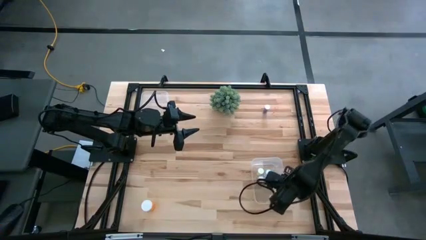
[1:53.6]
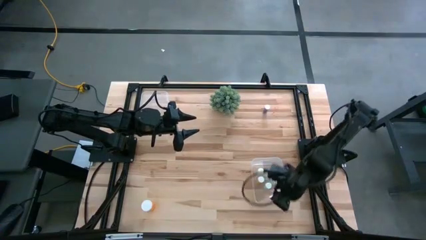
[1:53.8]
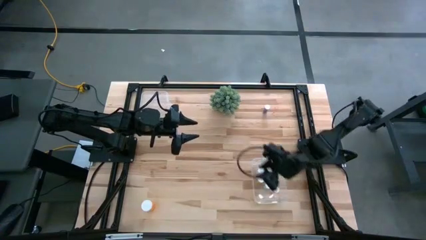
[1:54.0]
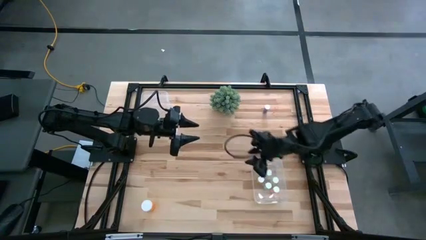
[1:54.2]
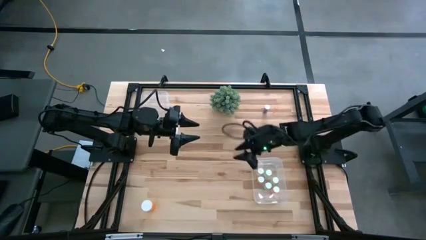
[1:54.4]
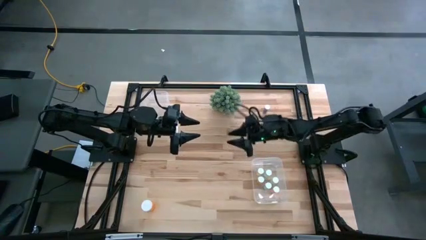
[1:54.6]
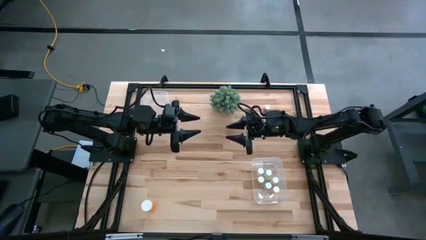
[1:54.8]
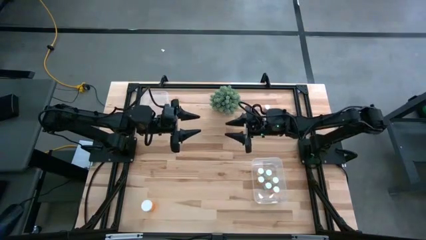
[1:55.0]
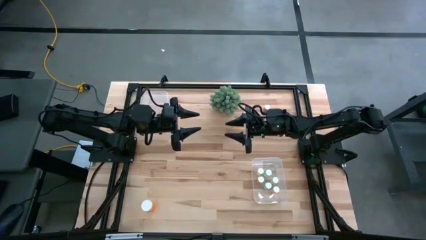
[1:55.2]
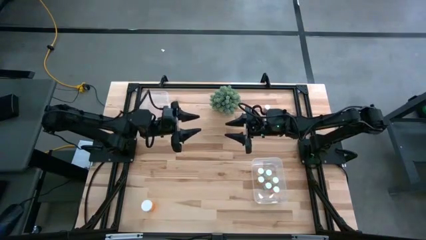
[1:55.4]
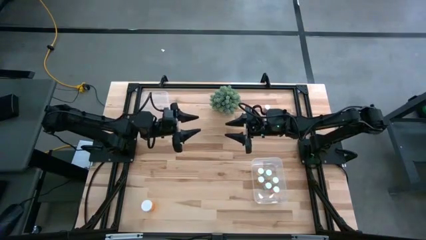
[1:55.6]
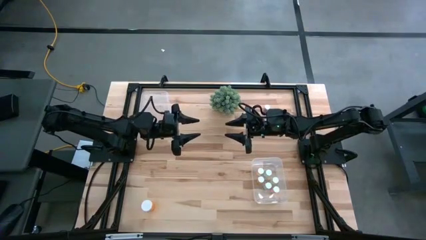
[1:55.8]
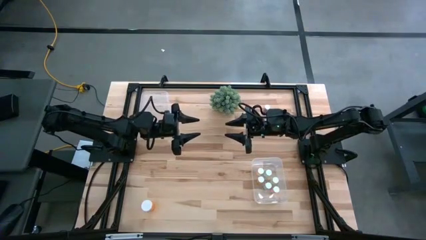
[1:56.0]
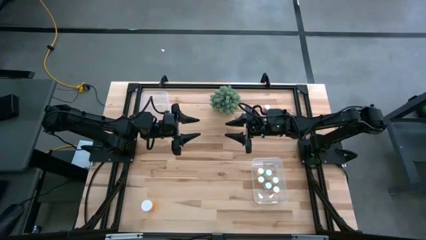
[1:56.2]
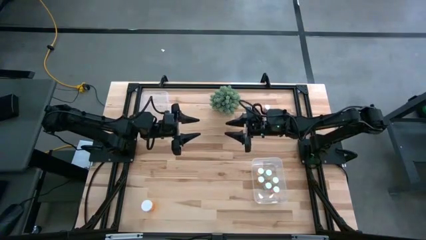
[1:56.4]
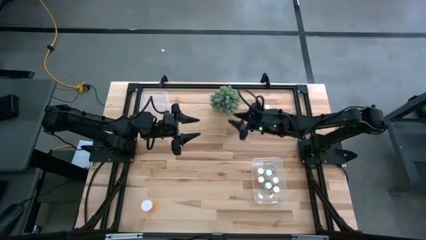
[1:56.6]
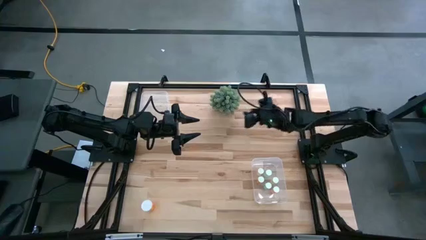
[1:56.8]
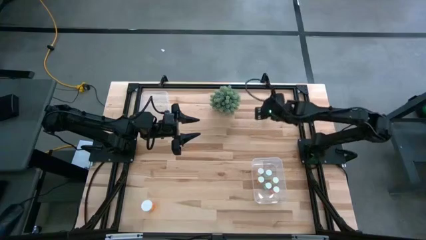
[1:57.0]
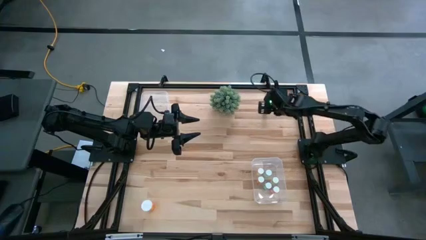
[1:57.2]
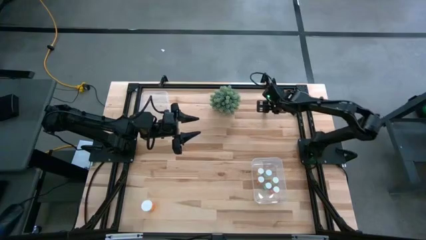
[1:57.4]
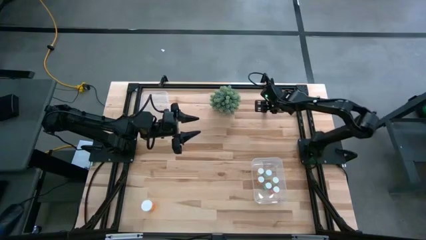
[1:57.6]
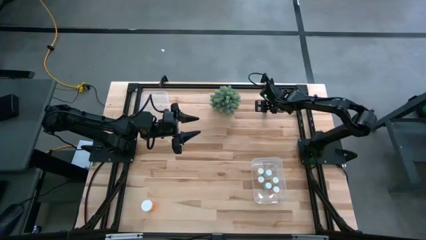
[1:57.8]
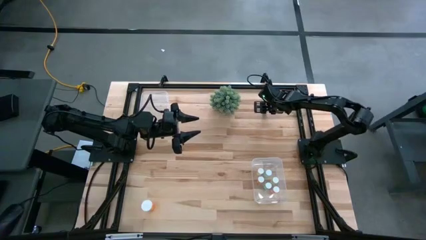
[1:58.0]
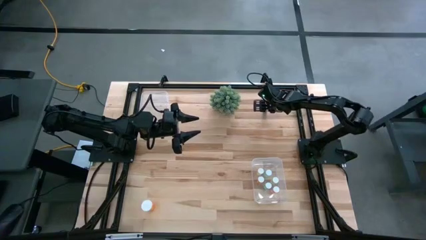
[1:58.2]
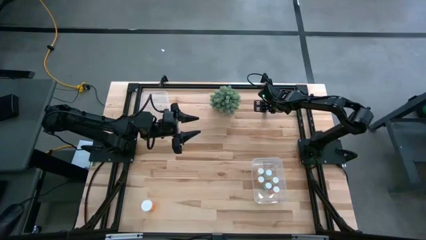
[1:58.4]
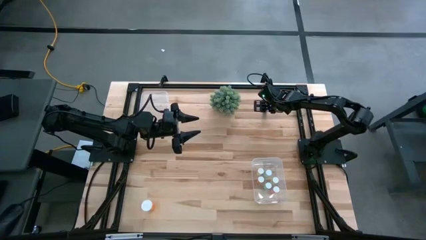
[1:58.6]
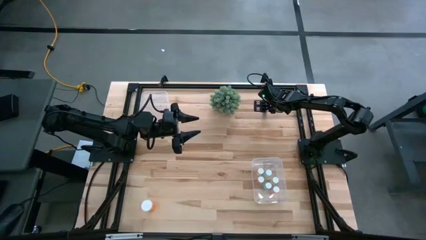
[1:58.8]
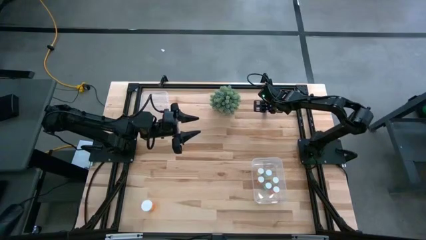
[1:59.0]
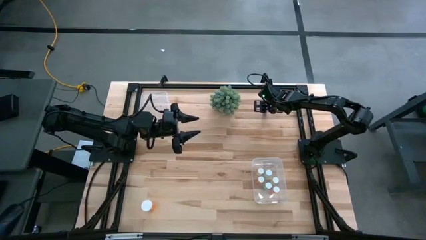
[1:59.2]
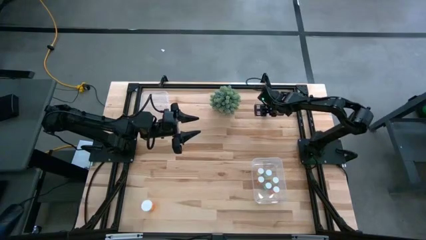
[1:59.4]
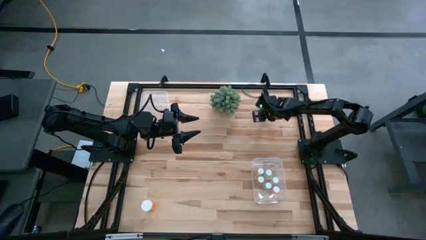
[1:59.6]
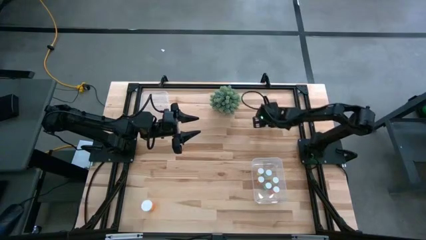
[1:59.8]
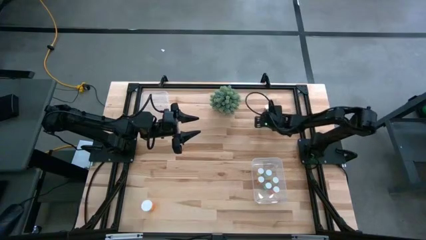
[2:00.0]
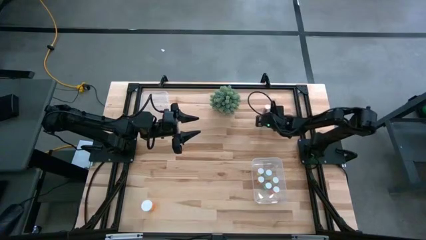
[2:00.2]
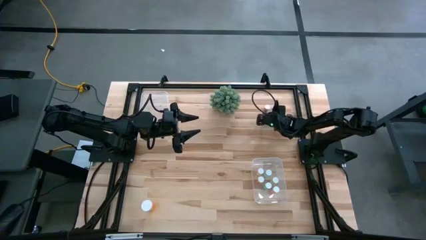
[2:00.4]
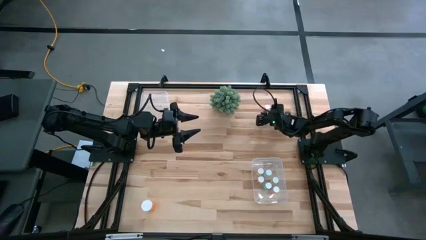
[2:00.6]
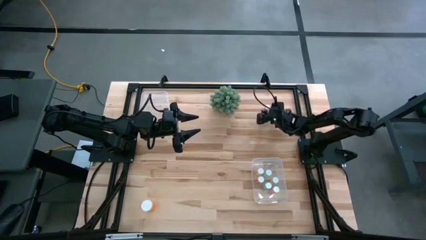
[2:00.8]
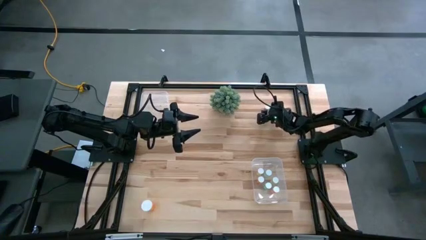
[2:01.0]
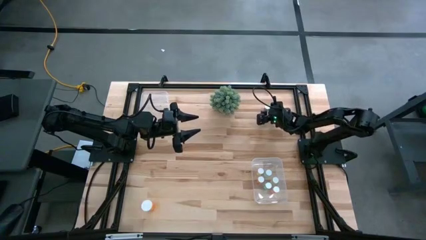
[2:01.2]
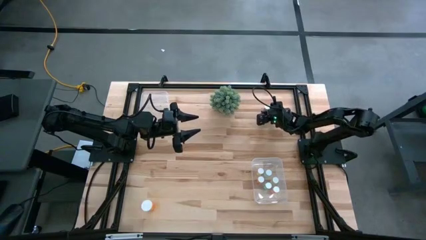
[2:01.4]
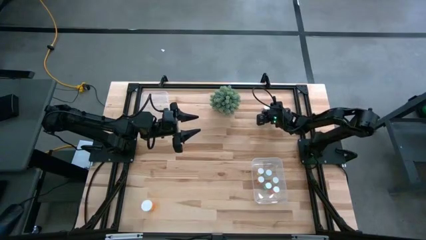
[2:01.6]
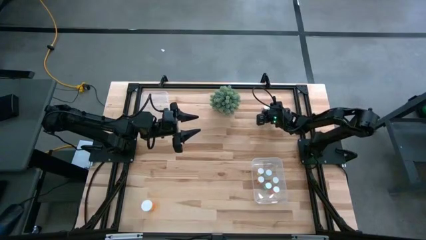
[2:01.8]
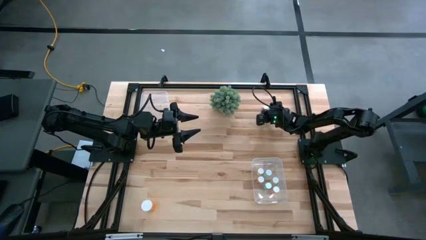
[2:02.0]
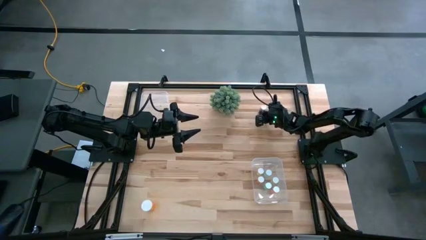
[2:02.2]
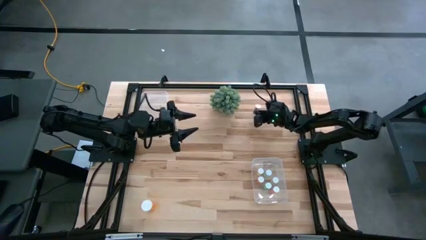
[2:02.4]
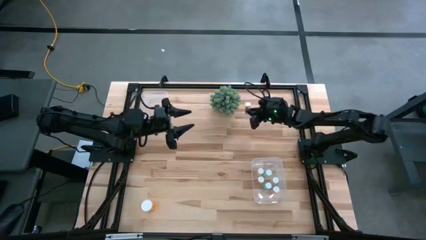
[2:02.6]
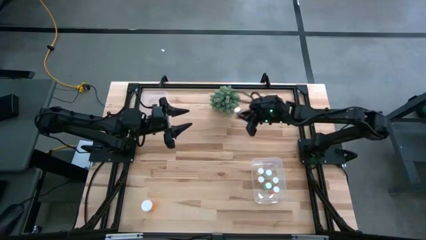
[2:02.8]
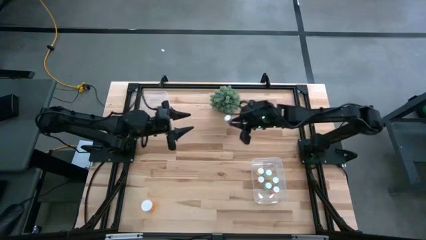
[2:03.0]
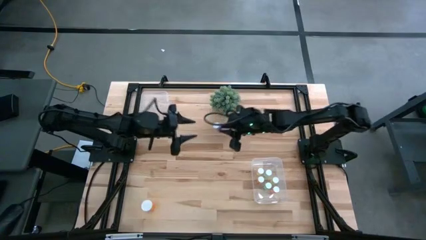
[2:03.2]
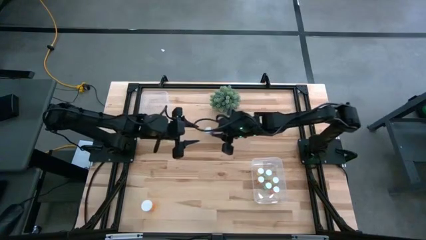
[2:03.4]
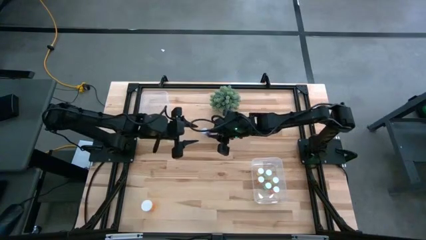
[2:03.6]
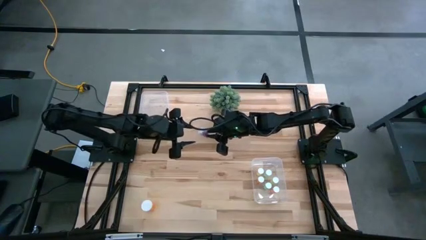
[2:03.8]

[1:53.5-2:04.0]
Task: Pick and place medicine bottles into bin by pill shape (circle, oval)
Put the blue capsule bottle into the left transparent bin

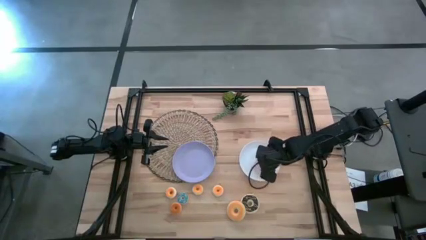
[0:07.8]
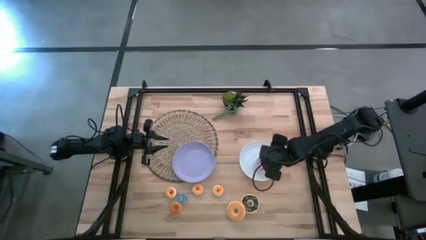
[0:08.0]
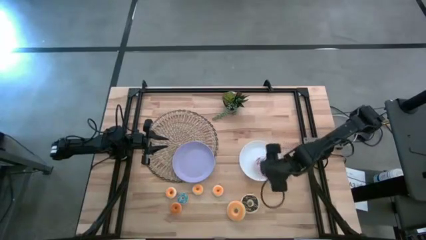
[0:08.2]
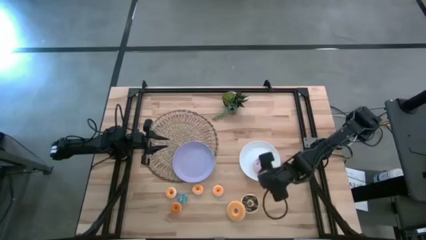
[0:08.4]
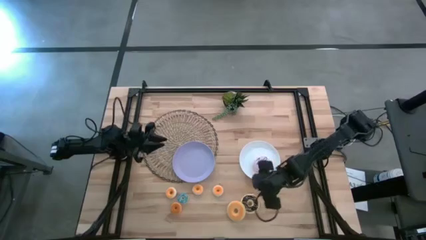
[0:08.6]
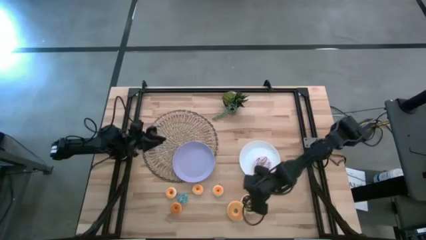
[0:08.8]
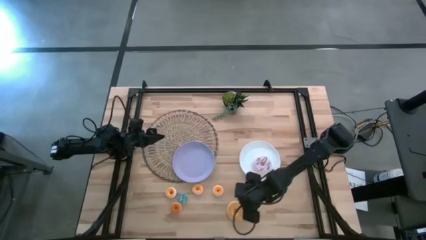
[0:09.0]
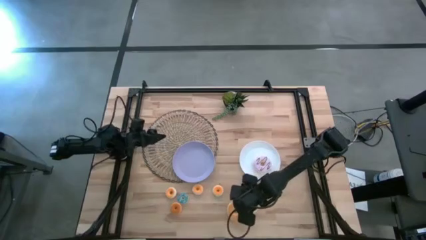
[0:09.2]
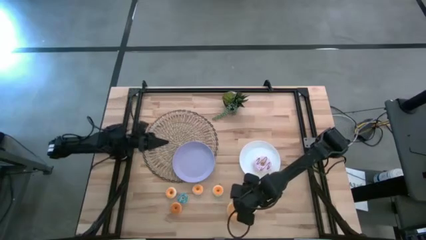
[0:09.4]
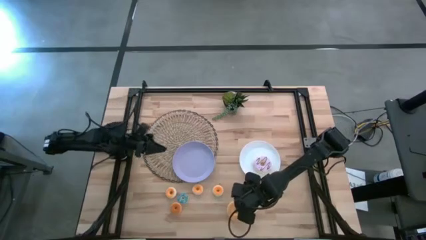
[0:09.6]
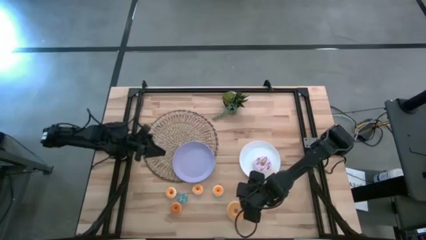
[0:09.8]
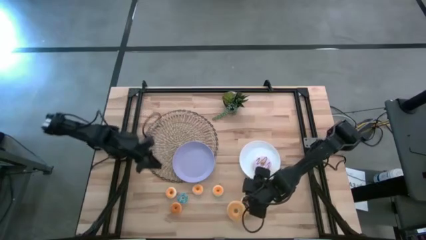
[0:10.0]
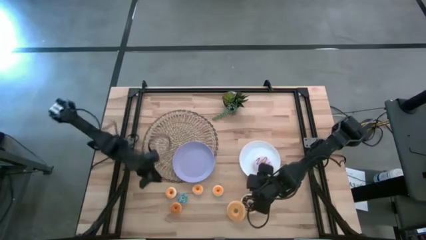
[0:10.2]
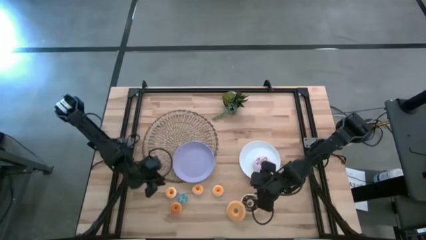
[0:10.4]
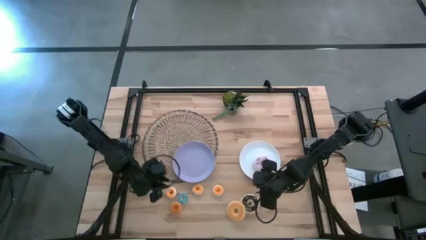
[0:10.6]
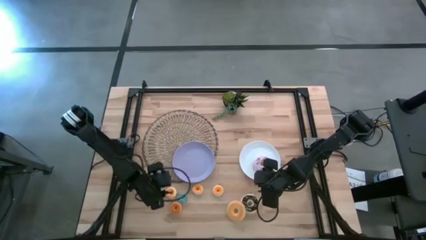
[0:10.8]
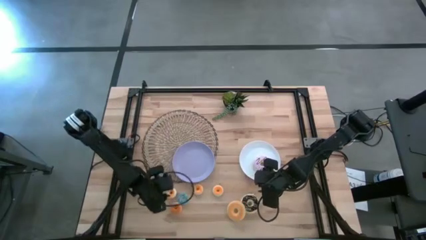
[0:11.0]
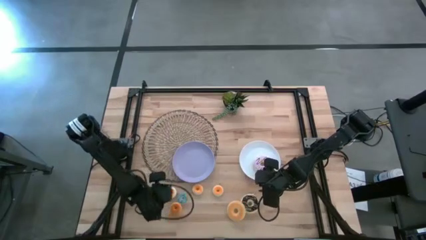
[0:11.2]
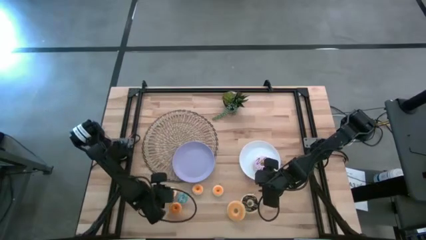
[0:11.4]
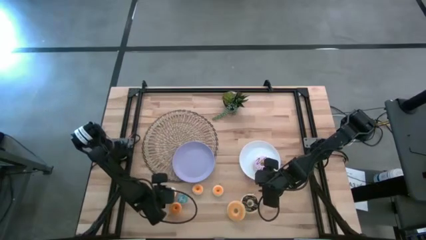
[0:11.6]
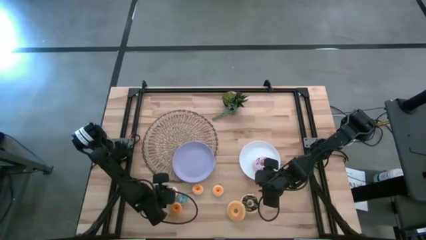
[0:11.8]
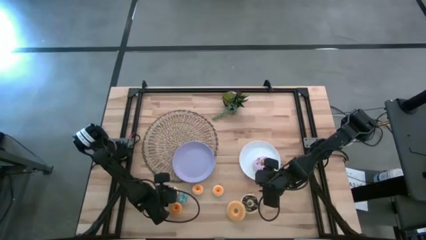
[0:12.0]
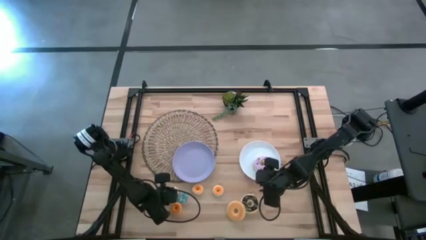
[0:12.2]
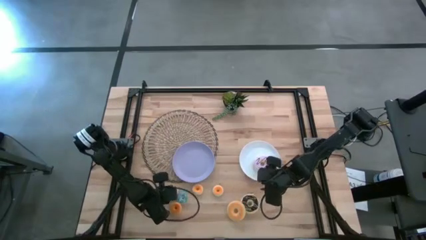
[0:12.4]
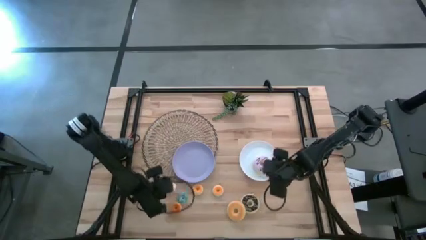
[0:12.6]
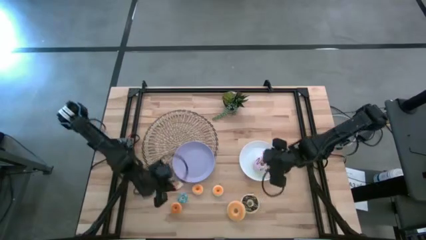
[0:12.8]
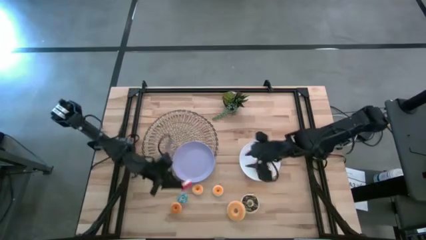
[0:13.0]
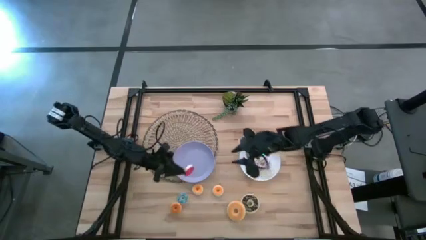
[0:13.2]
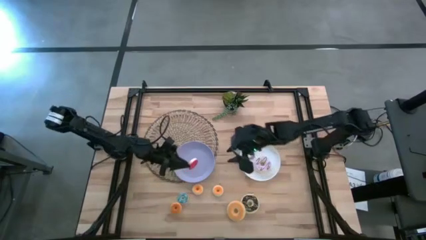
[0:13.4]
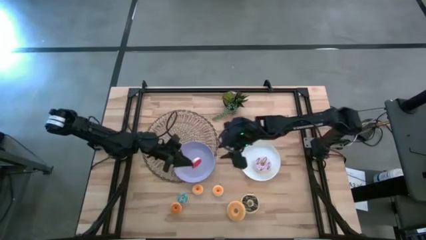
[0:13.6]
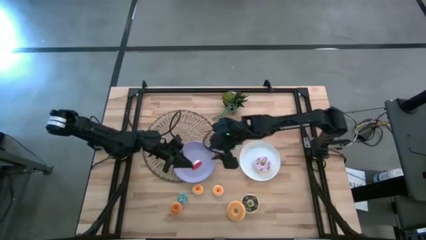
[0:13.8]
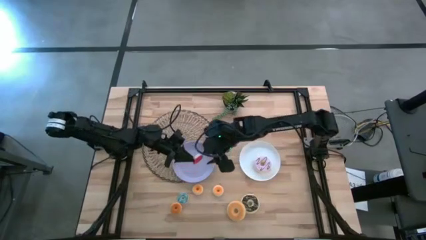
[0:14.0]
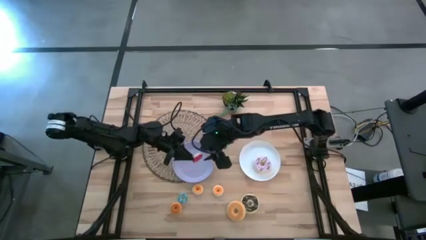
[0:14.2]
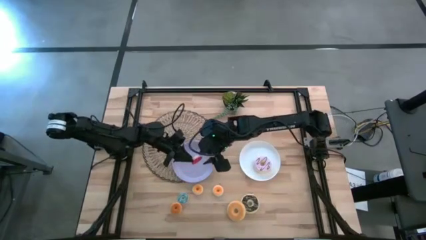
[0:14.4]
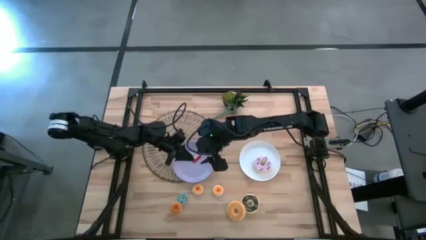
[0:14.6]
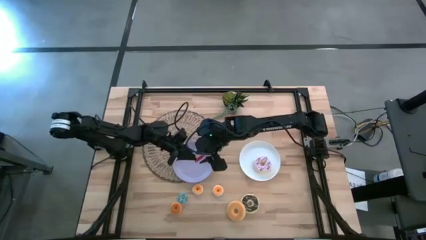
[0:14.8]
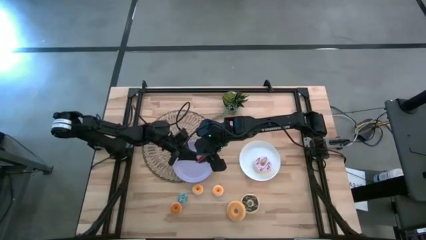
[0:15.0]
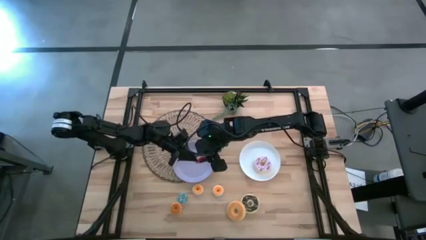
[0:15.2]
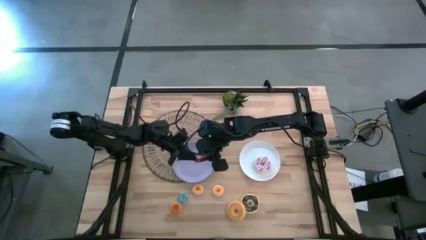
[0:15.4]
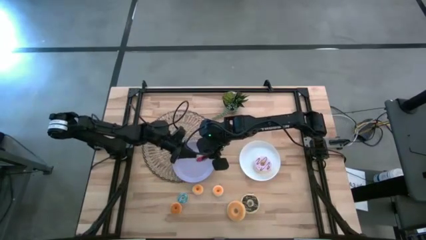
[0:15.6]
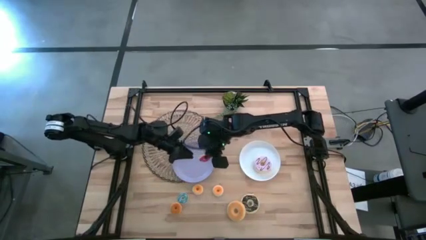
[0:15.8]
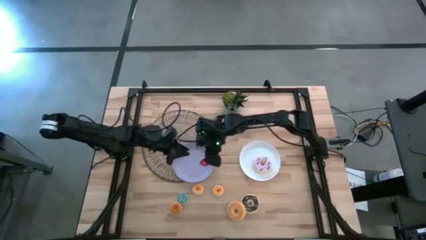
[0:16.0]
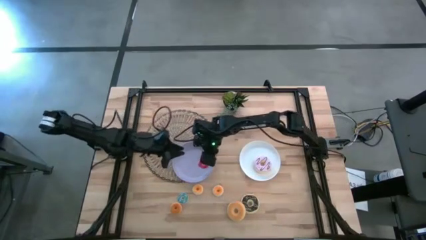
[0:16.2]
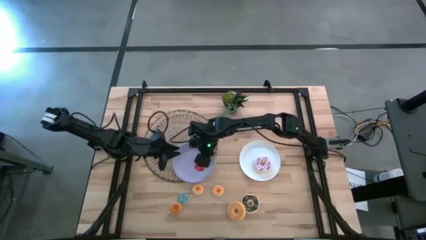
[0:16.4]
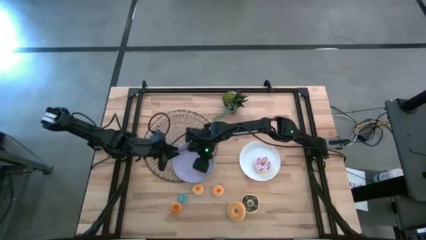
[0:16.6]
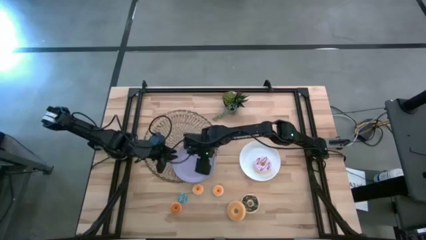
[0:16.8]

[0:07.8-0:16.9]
Task: Pick & Place donuts
Put the small red donut on the purple plate
